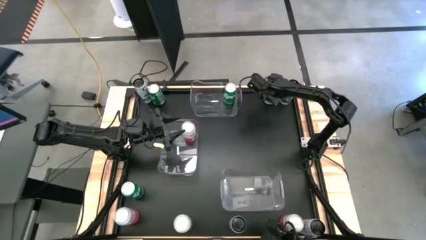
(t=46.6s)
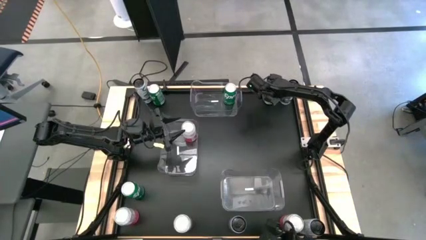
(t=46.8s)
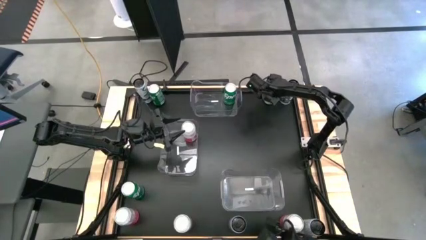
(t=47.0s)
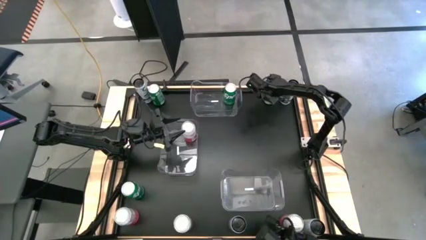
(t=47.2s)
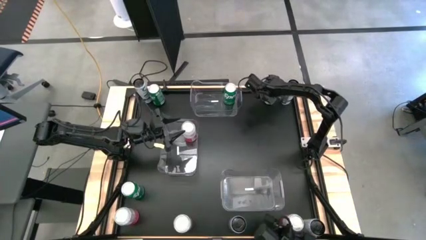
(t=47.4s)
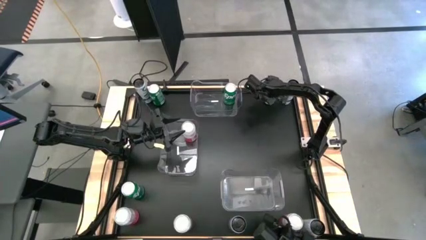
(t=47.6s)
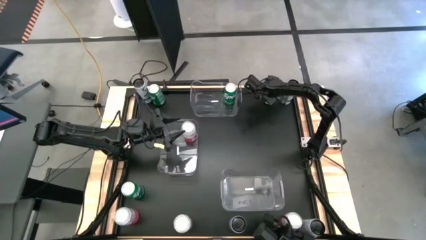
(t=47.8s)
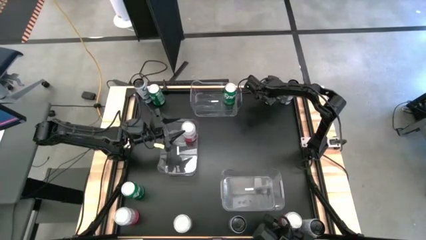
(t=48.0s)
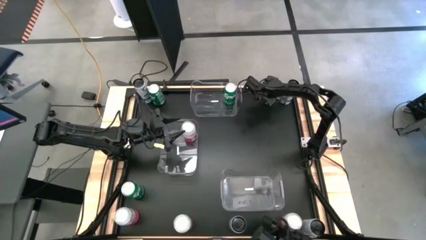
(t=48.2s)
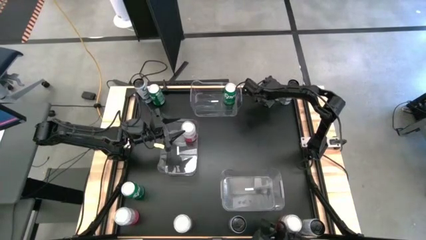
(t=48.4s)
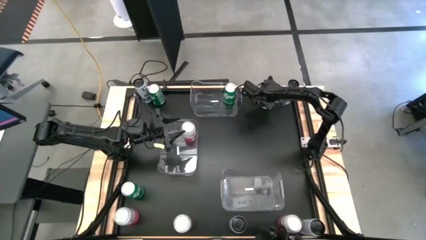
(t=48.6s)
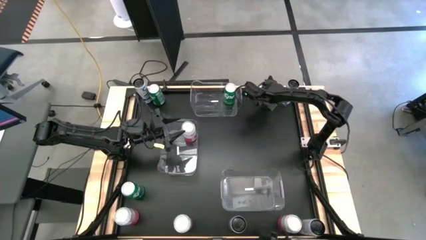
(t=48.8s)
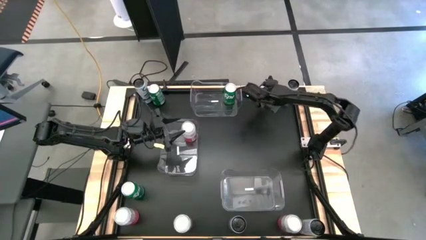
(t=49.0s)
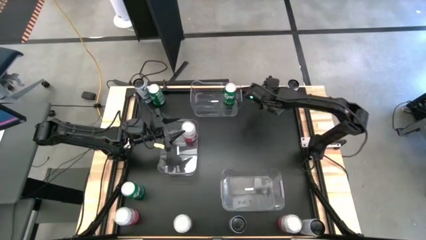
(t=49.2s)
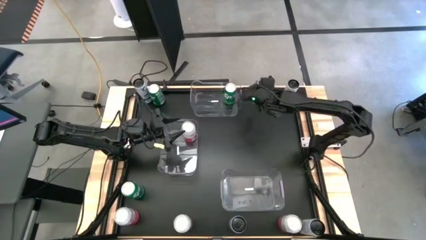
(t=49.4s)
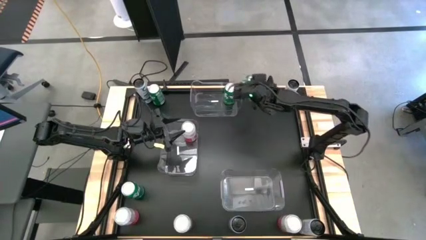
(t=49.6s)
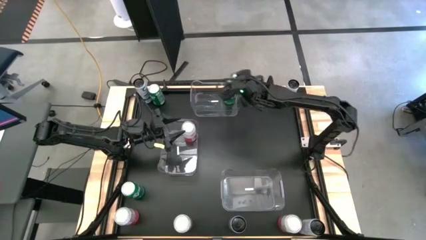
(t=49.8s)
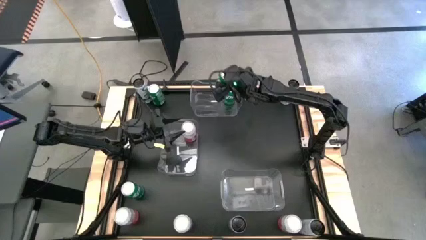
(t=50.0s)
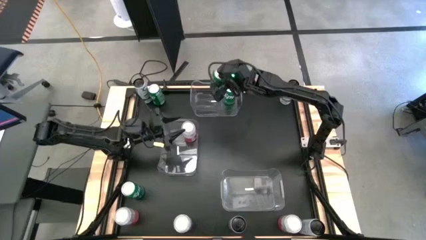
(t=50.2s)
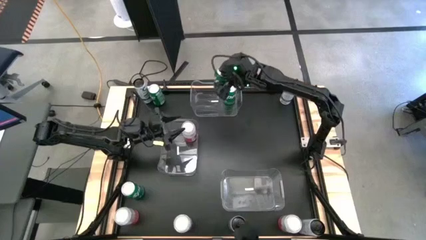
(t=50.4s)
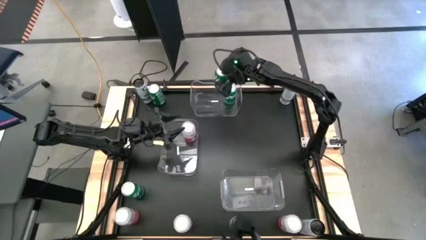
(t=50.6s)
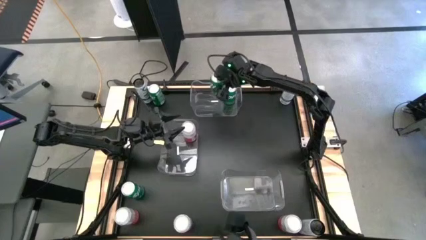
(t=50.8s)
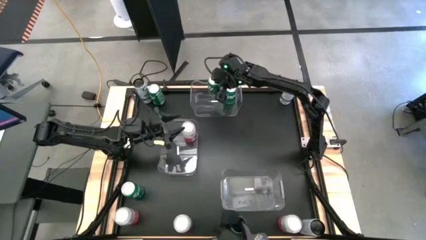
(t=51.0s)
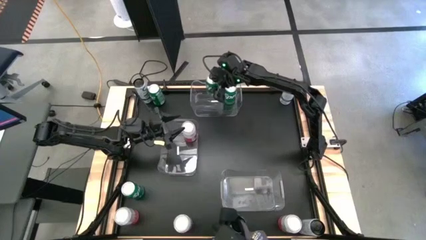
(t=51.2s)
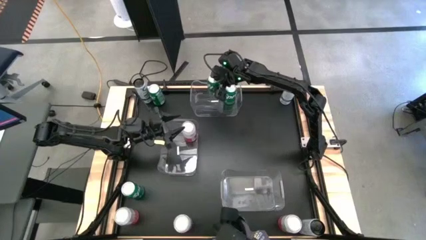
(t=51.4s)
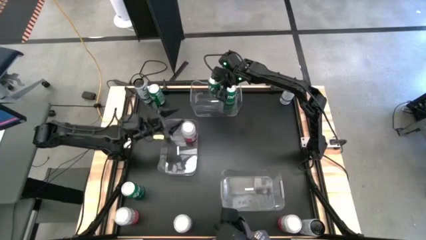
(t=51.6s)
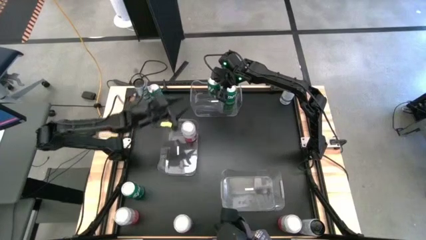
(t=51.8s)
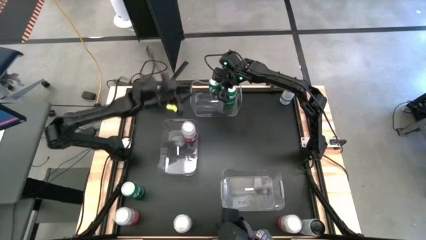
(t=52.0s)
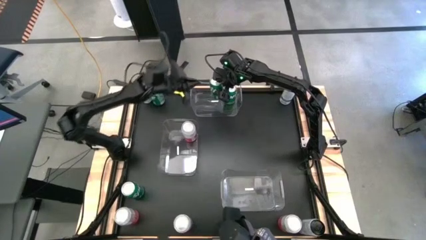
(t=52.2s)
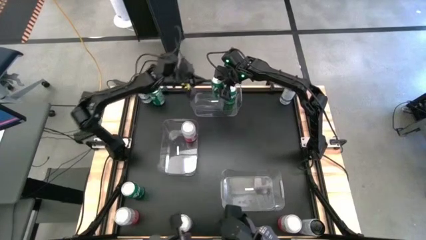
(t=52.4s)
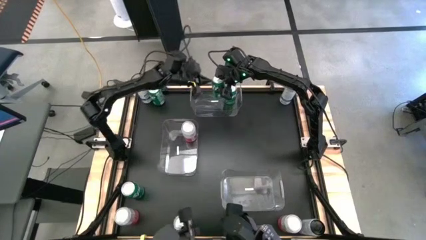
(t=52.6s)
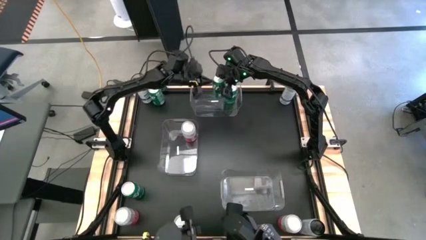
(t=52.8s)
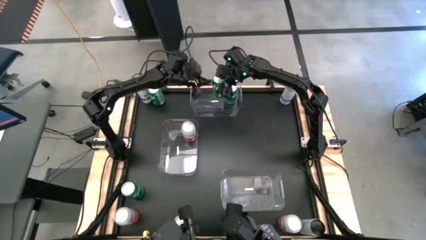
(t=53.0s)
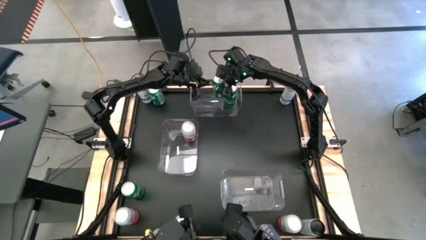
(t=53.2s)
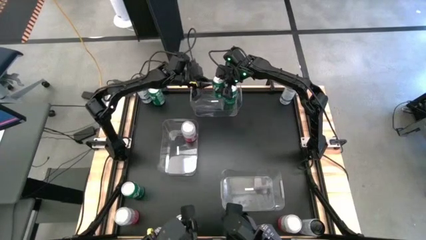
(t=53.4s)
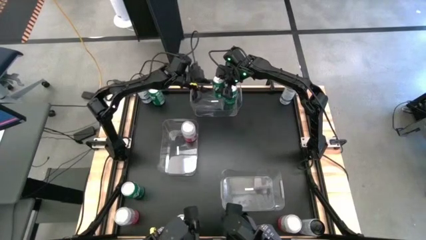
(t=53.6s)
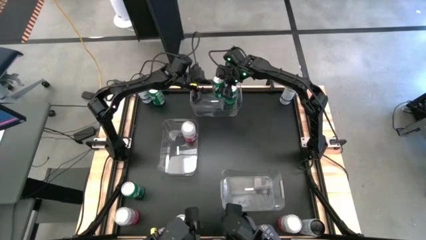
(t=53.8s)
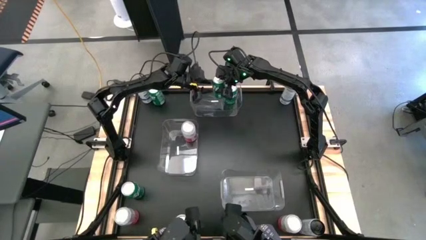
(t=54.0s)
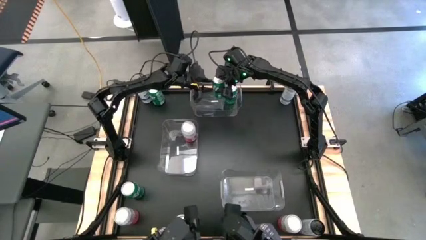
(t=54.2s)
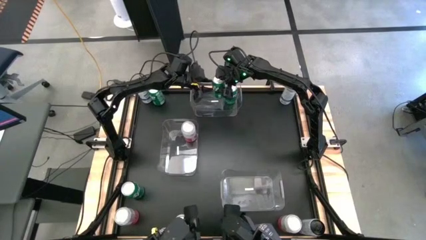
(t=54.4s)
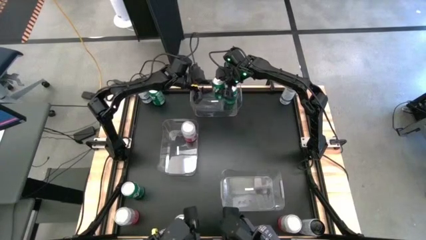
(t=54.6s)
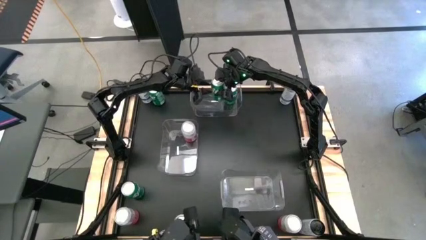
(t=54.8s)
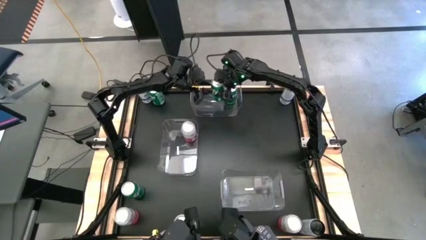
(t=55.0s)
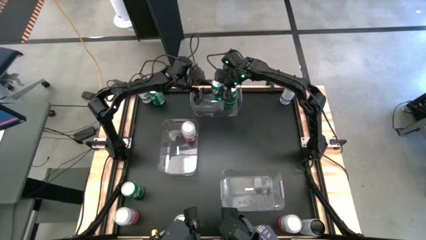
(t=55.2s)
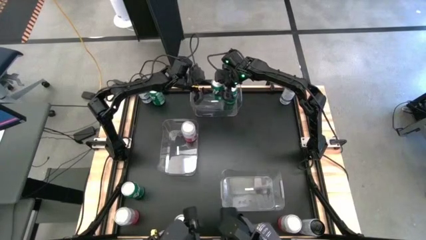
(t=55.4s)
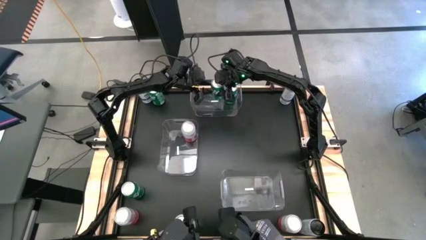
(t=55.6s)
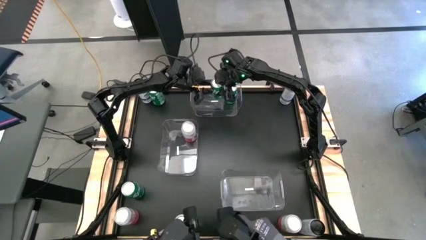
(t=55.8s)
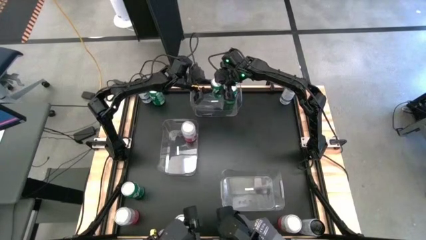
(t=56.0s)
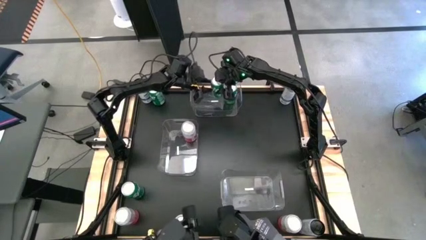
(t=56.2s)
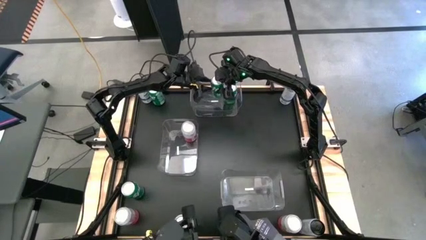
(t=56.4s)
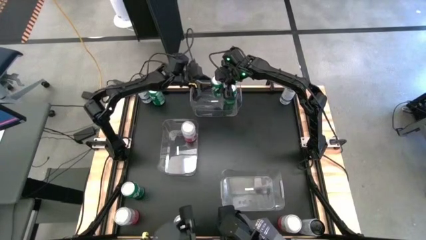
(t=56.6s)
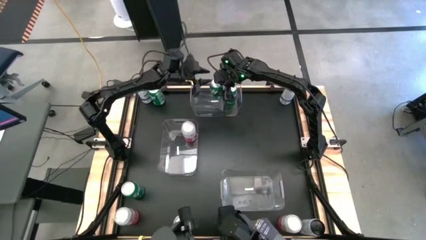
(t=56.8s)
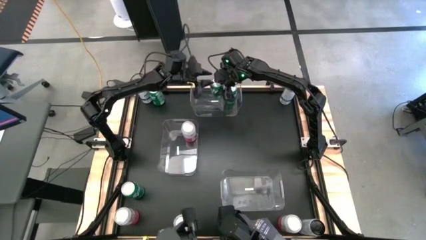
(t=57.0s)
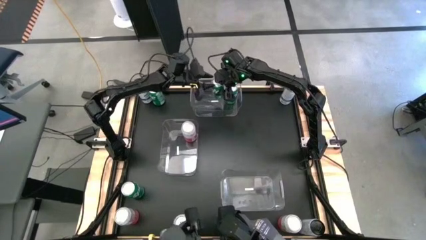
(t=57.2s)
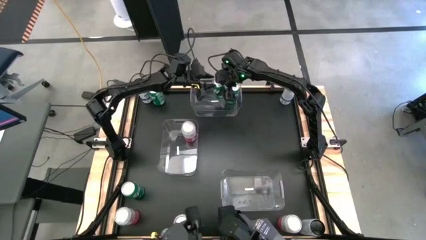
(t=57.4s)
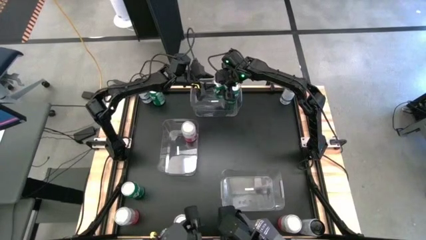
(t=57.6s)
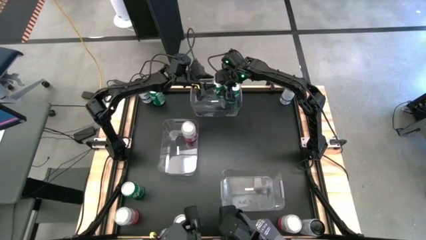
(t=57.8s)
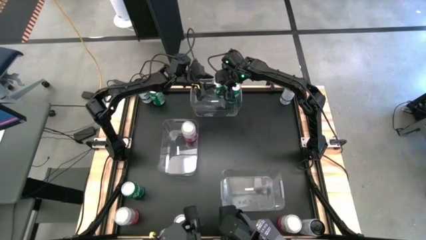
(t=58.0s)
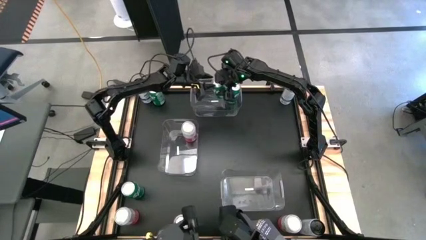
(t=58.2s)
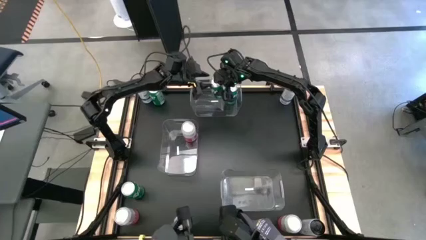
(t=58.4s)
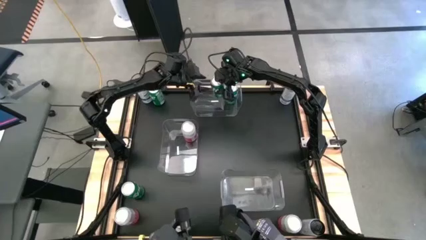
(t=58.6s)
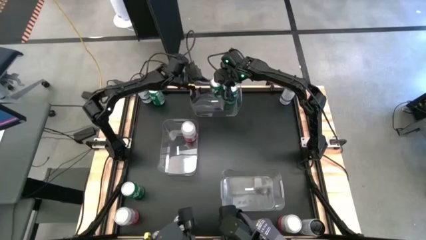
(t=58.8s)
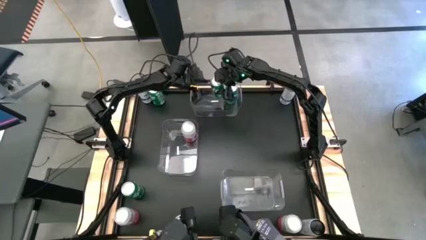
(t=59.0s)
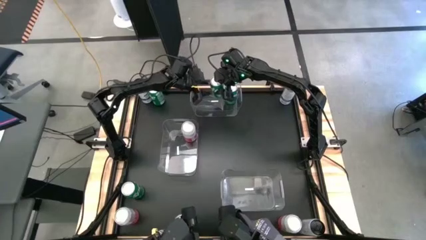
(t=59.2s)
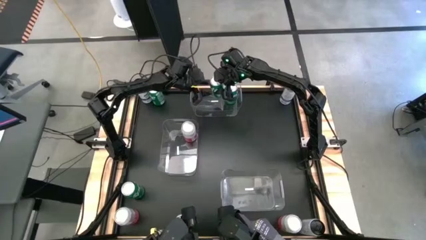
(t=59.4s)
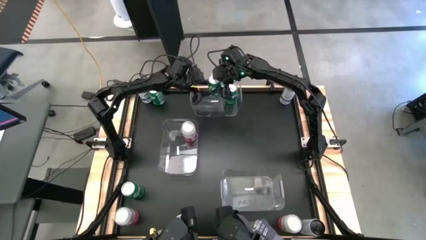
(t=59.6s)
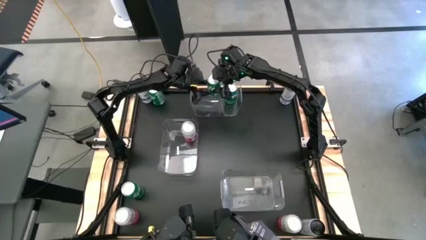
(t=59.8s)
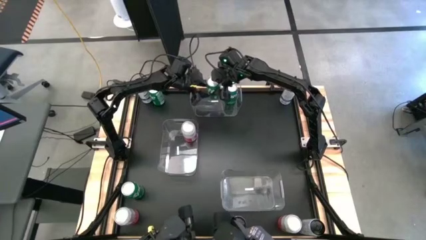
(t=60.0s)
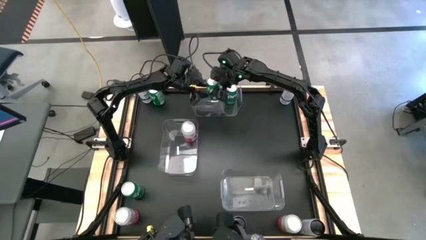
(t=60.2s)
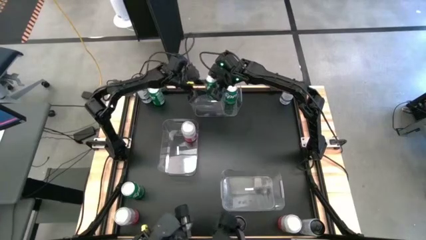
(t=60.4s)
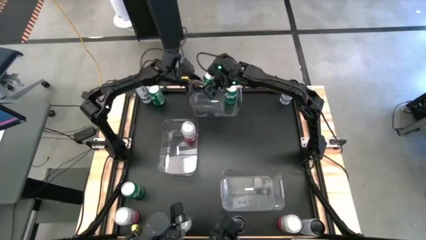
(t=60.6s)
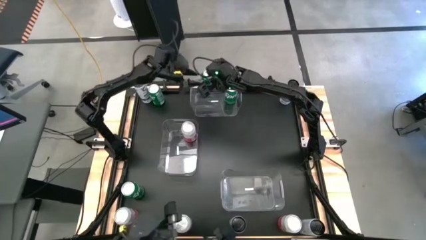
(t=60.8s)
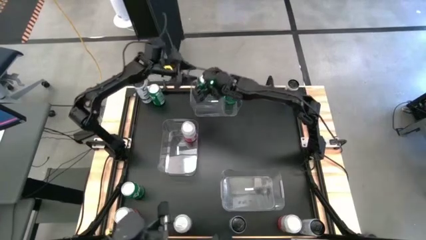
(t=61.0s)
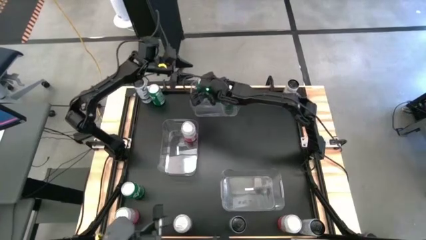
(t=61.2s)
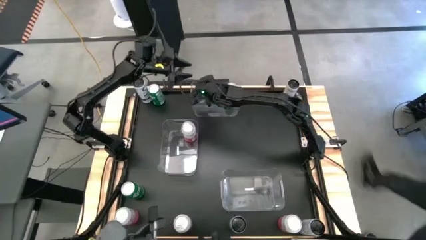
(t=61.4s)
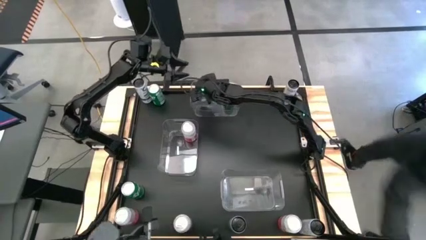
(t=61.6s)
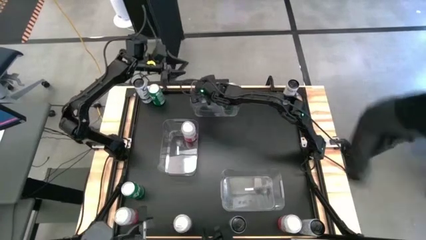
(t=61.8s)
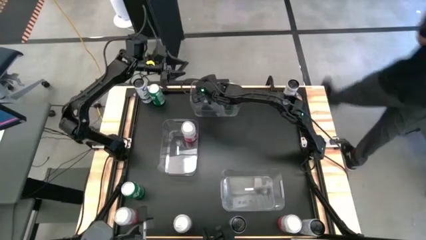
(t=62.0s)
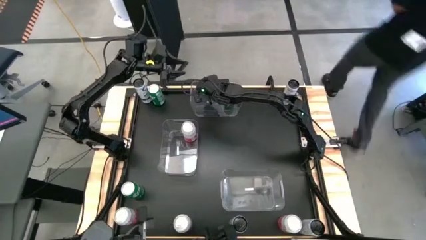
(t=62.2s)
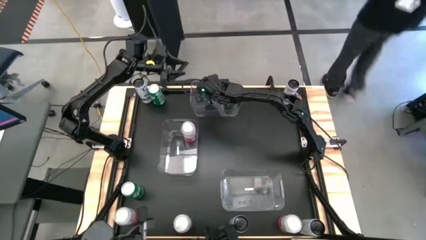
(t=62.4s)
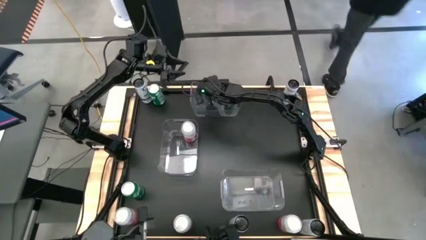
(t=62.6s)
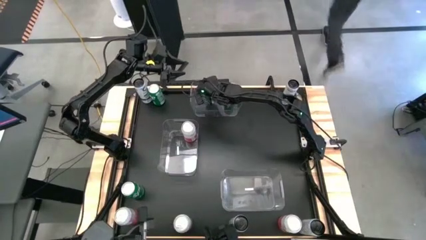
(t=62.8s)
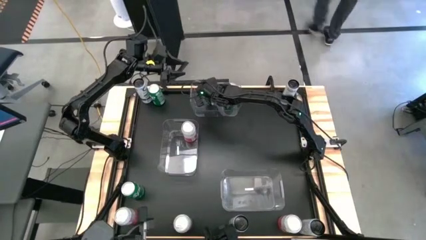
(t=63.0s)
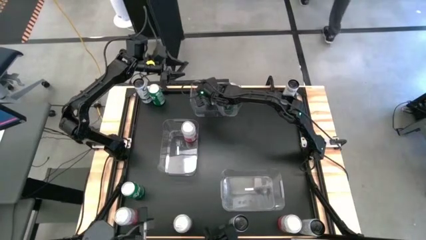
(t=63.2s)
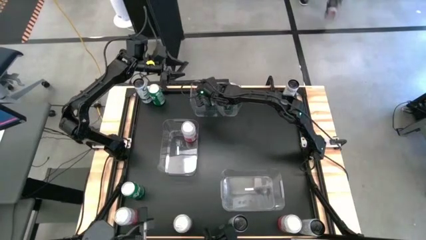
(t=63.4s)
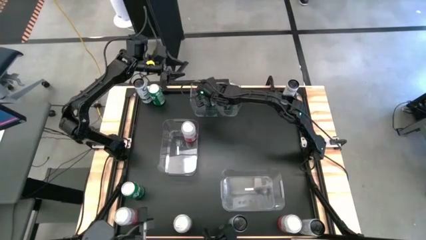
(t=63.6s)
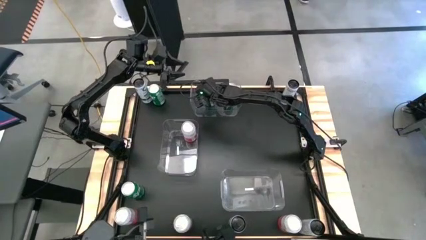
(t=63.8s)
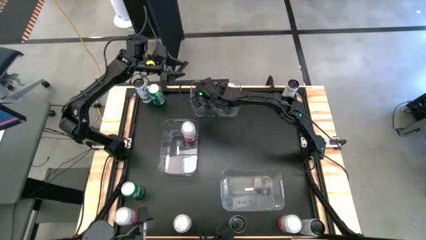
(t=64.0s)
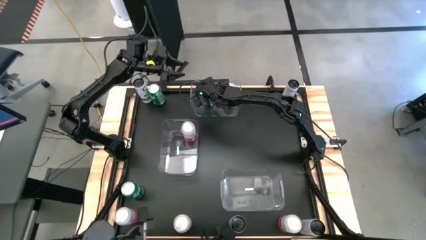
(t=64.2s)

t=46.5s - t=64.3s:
Task: Sort soda cans
Put the green soda can into the top transparent bin
